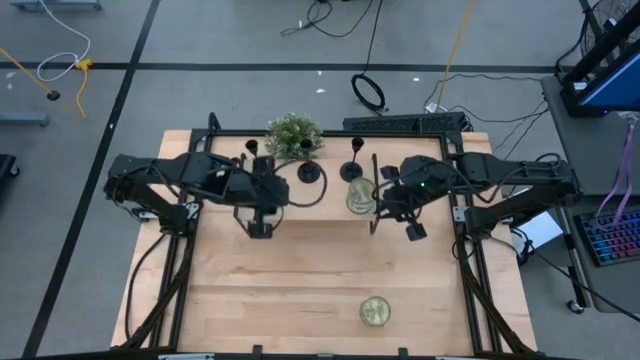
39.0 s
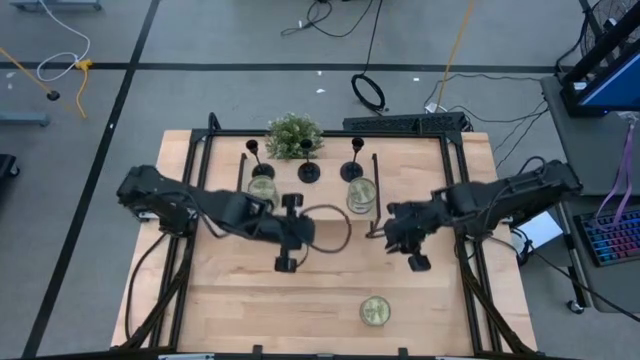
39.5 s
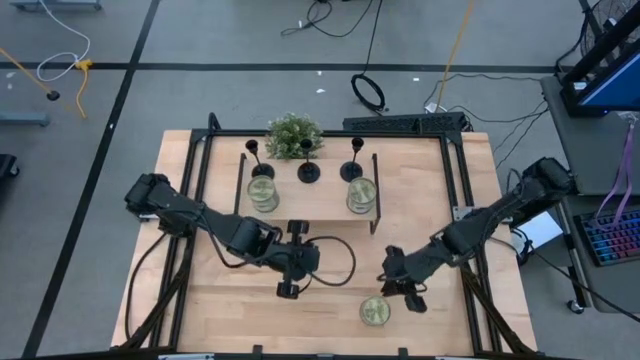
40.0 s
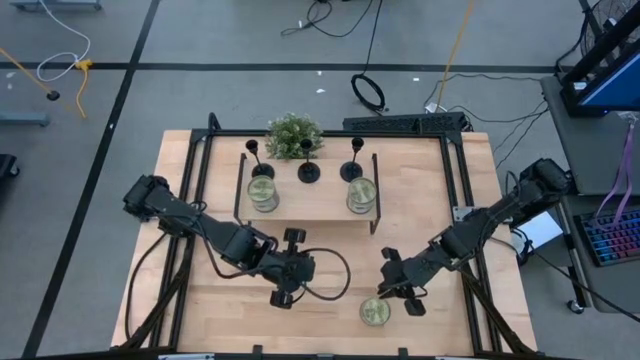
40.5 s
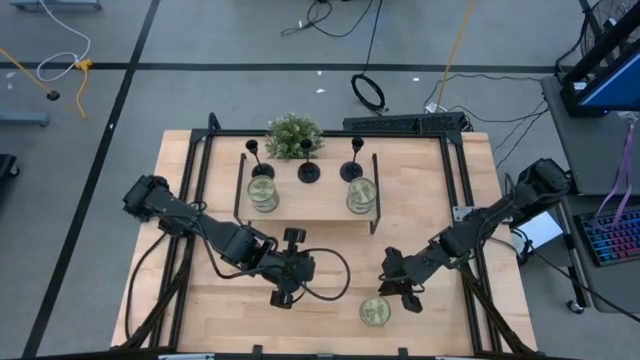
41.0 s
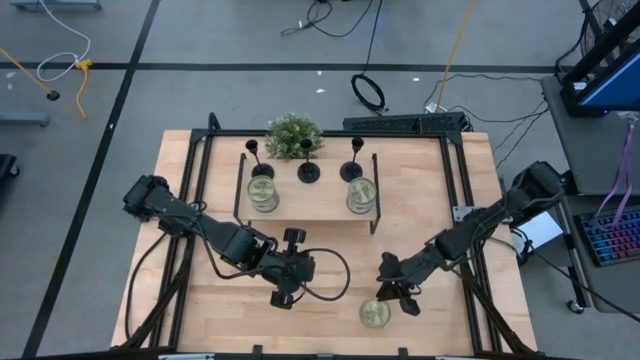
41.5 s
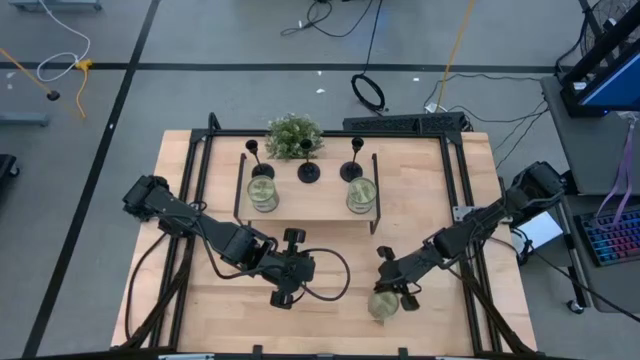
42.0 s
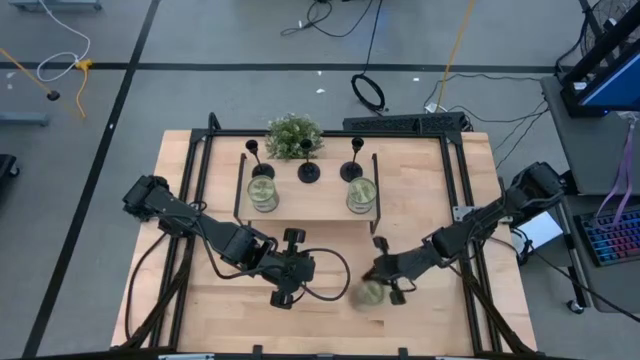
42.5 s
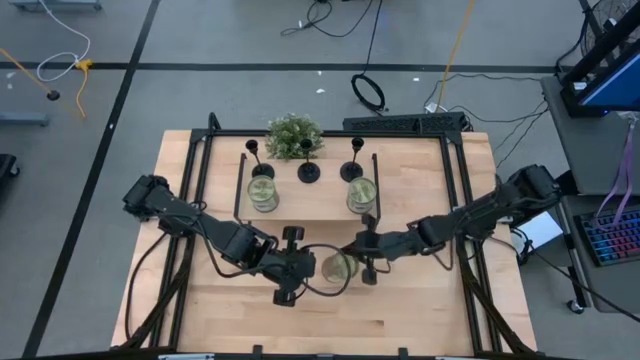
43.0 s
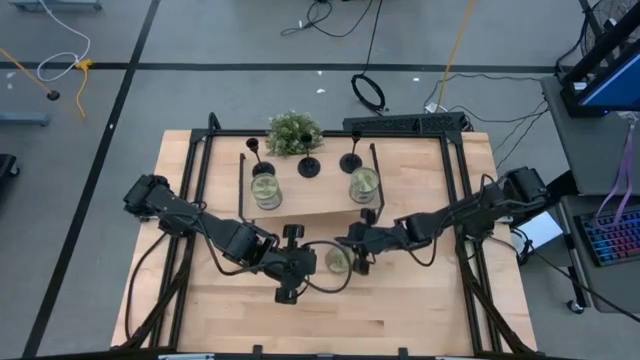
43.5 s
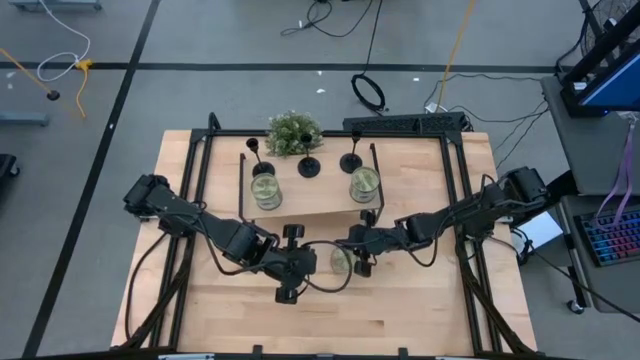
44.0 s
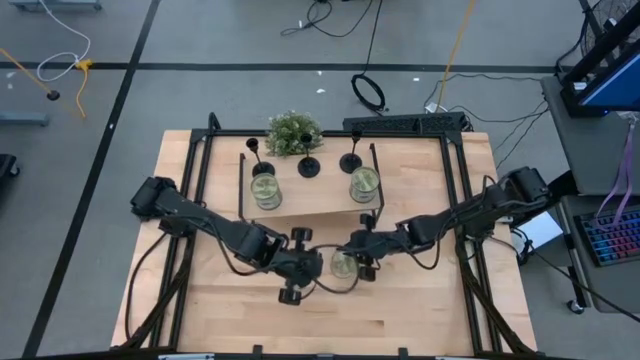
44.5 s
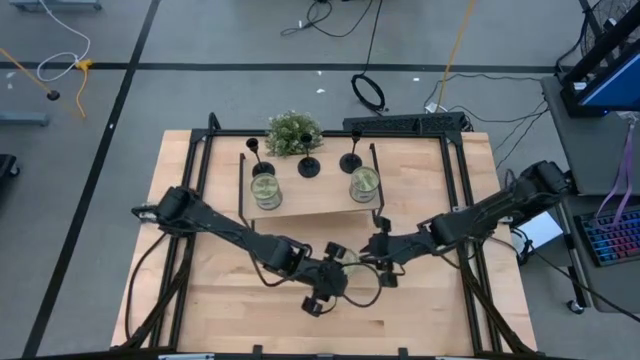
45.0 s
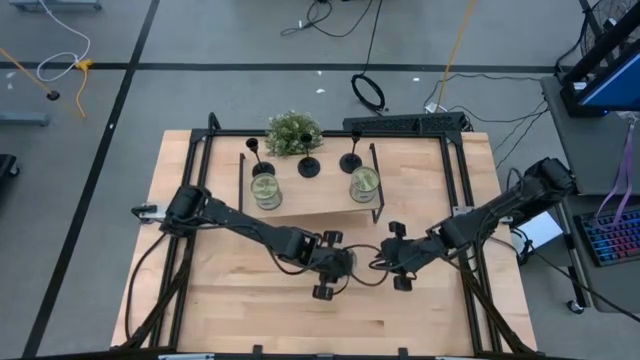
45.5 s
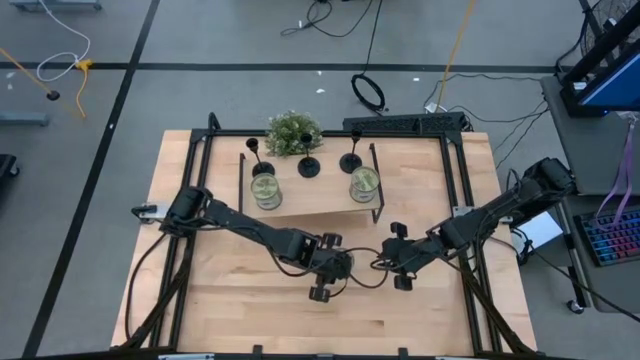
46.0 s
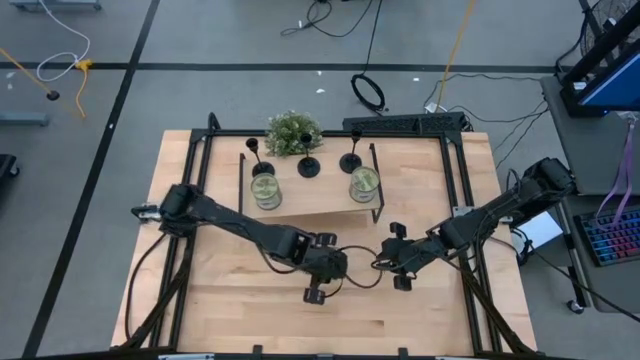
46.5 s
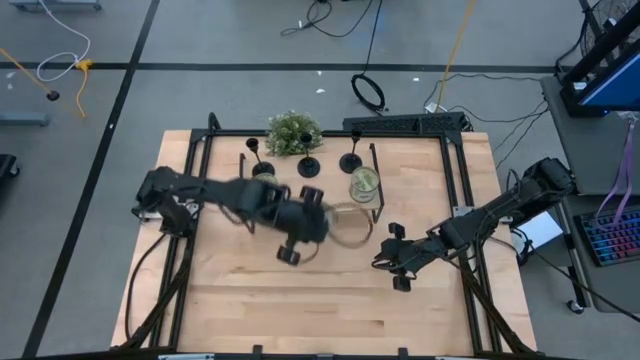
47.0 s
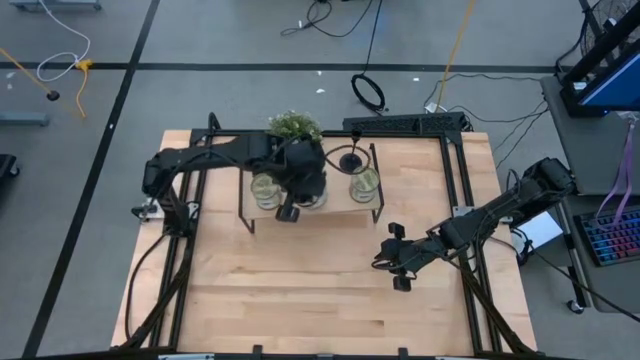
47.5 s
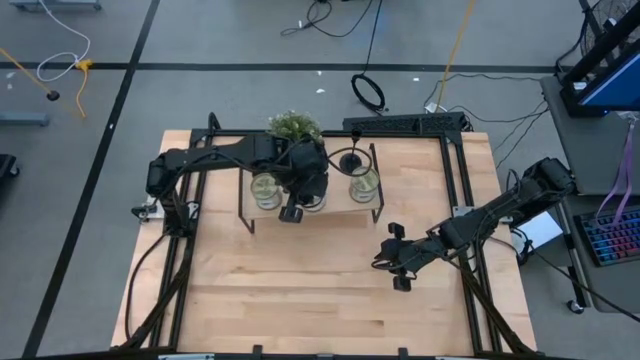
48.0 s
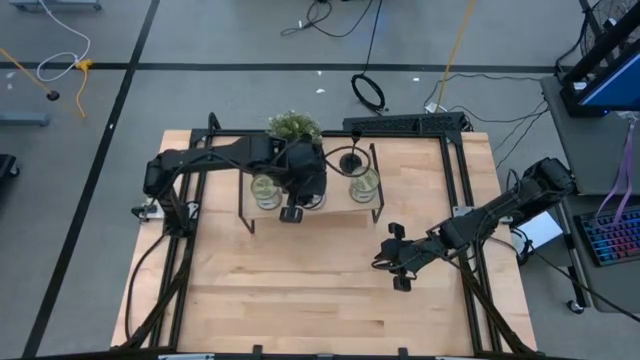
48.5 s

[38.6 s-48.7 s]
Task: Pick & Place candle stick holders
Put the silver scented candle on the shelf aligned with the silver scented candles

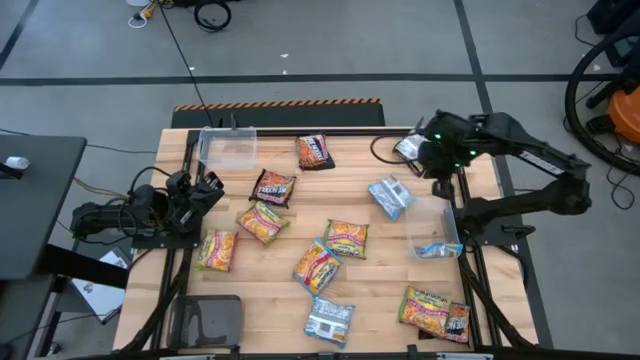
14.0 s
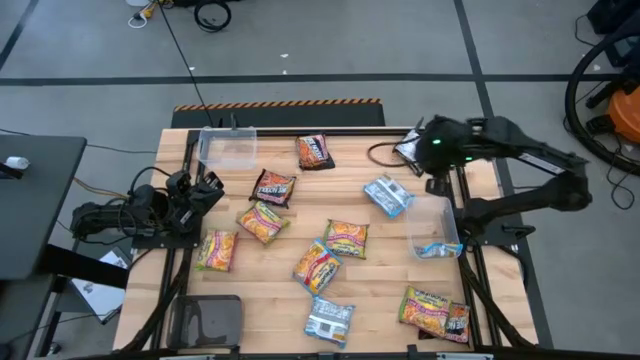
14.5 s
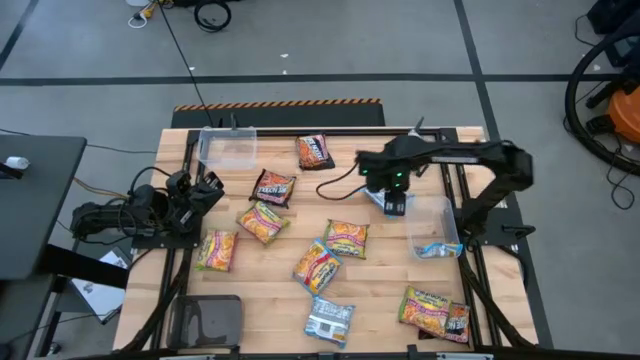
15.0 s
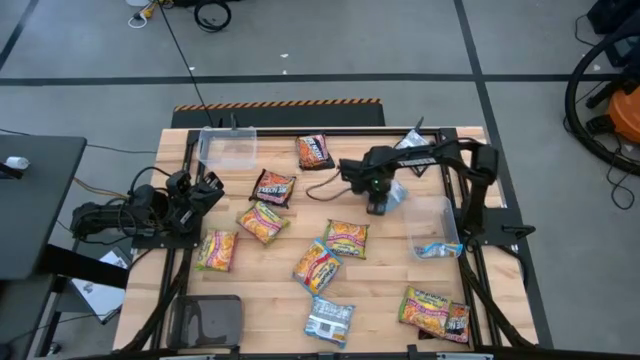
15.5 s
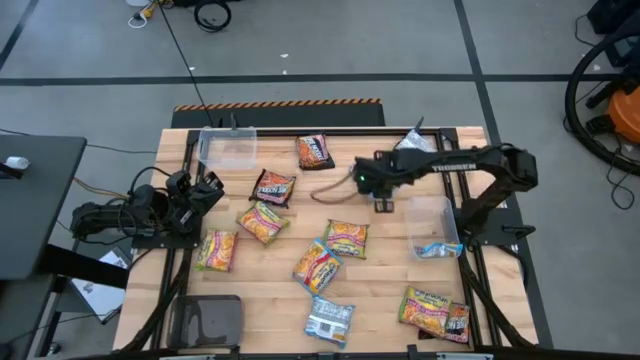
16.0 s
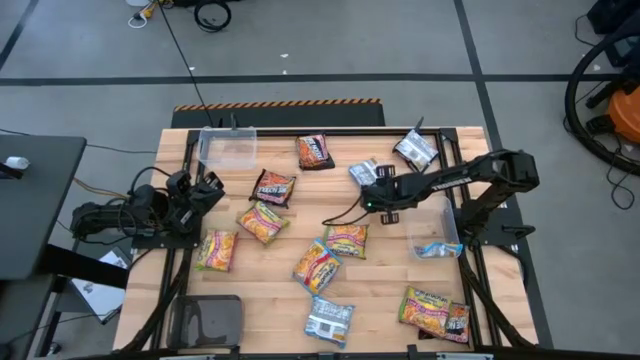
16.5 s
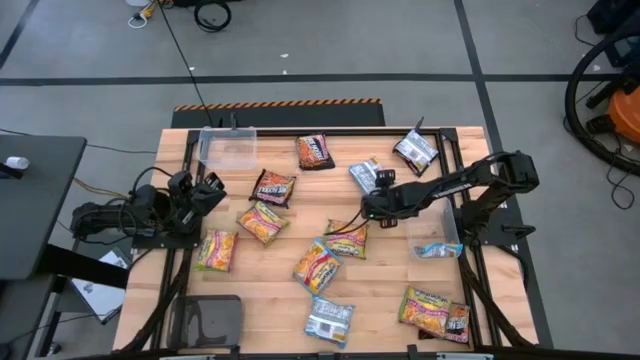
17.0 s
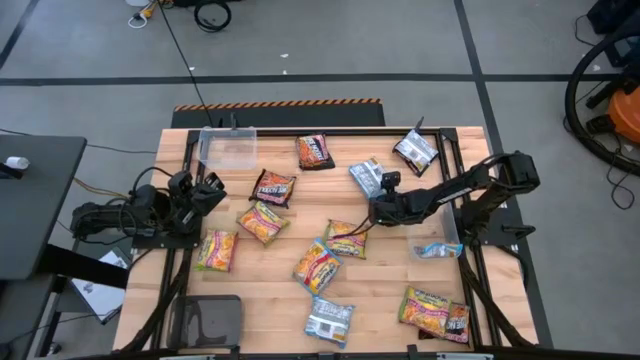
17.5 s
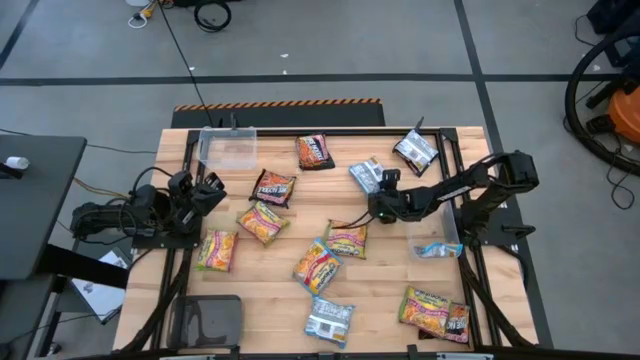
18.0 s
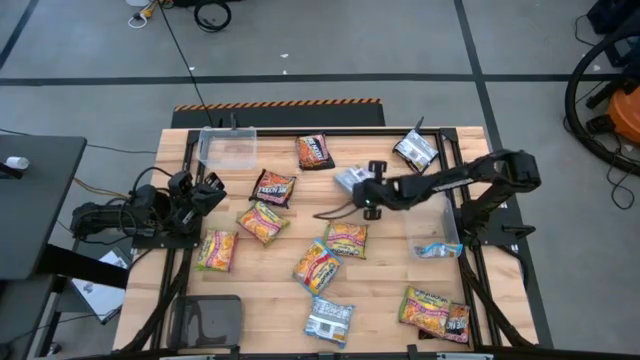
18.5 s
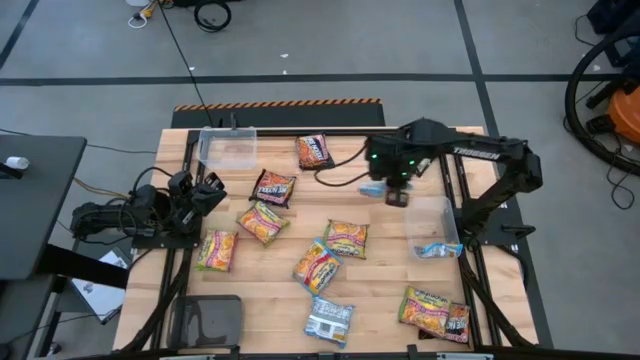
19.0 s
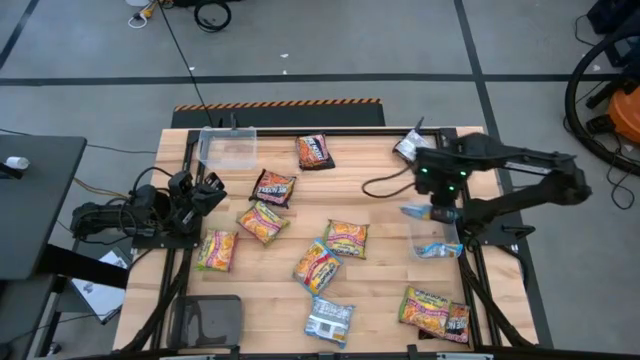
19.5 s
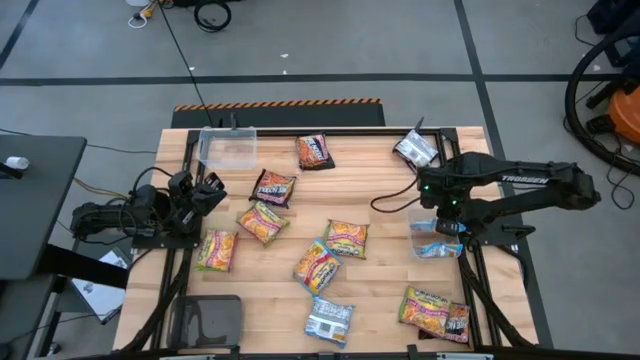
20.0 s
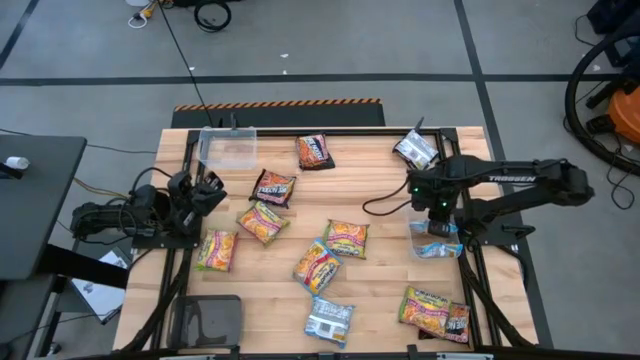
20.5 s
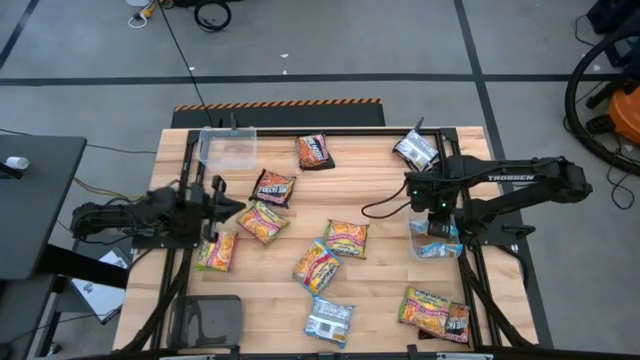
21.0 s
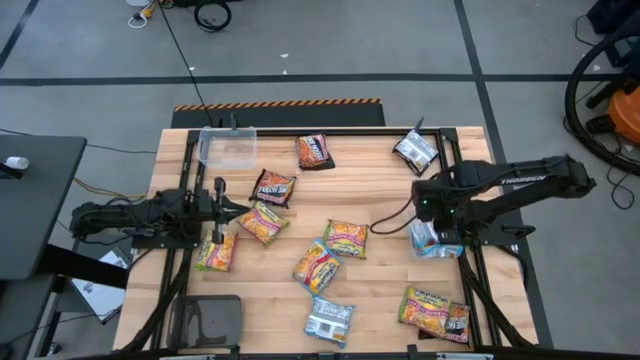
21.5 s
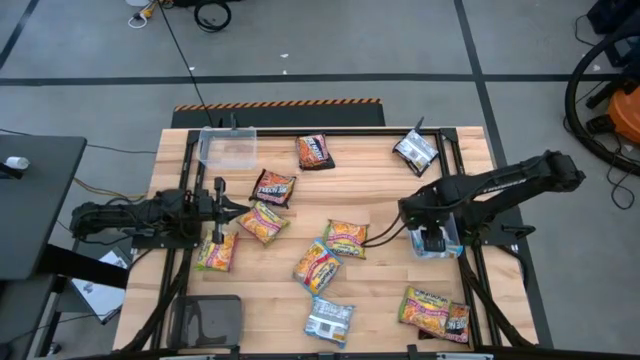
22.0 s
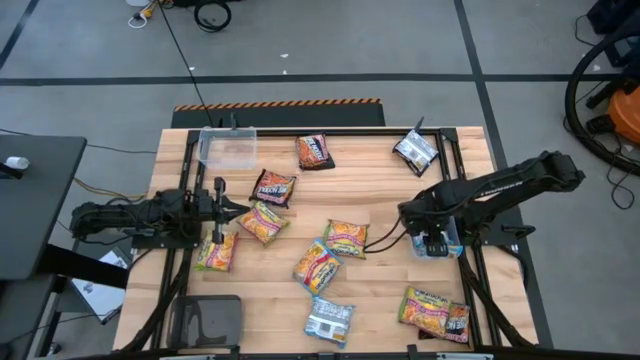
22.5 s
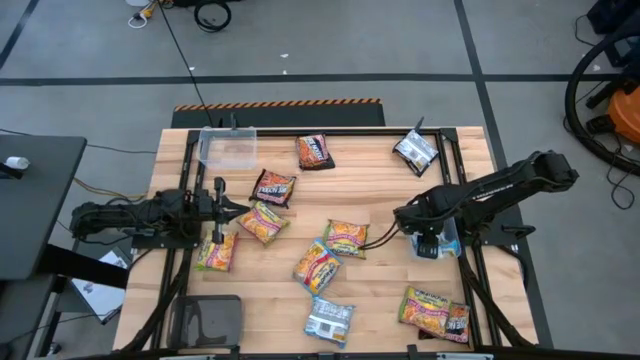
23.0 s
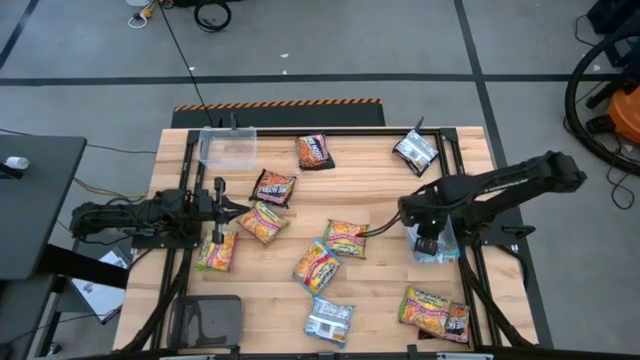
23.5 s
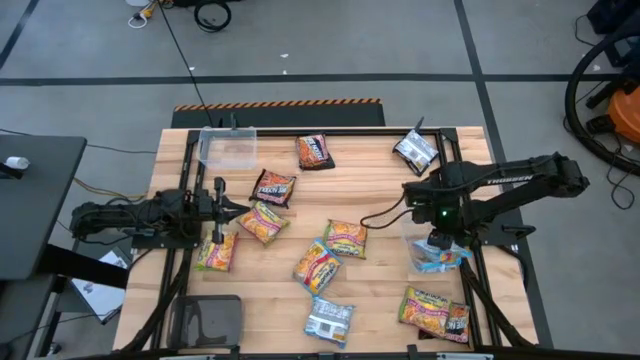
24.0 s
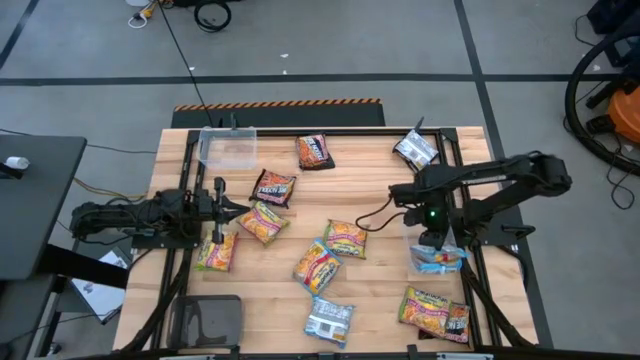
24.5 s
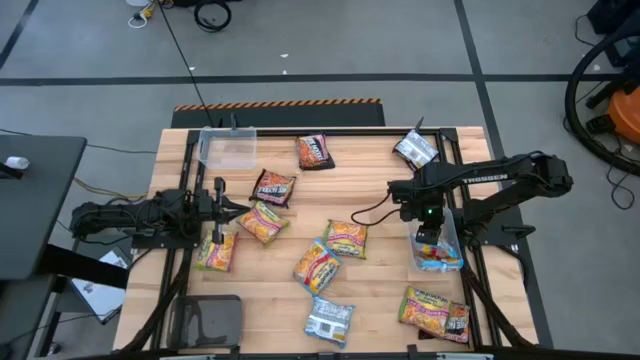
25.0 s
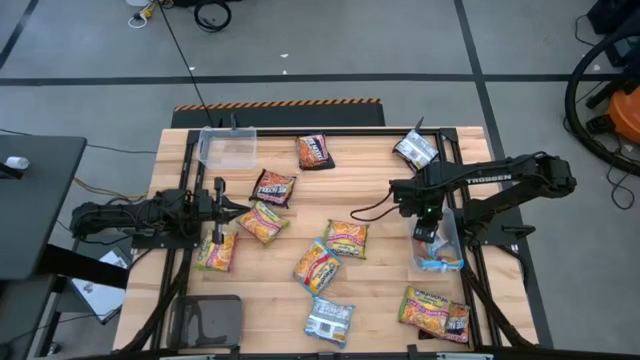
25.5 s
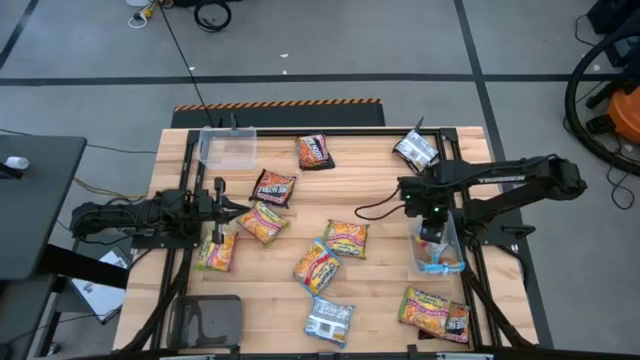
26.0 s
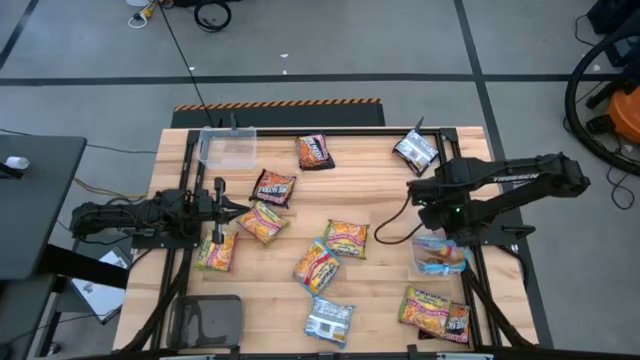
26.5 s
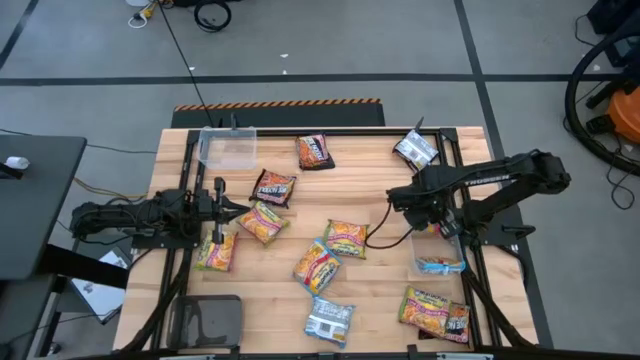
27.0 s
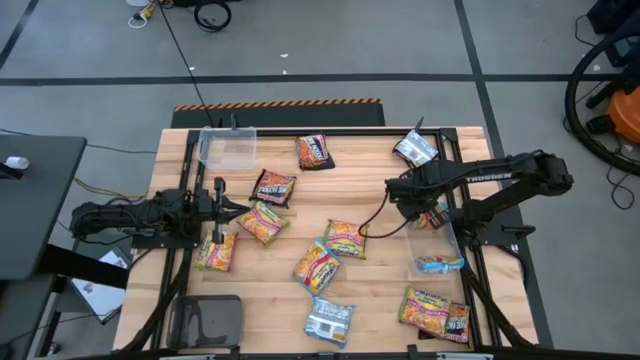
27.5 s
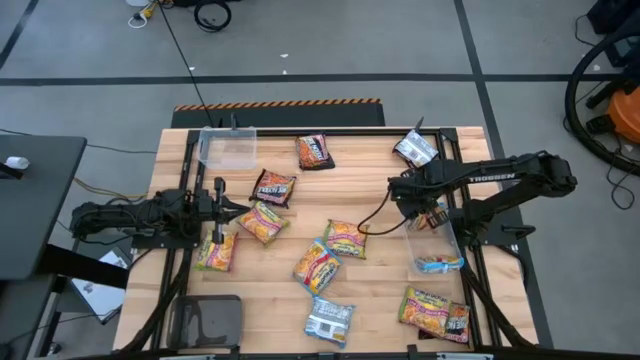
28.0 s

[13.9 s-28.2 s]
Task: Sort Maruchan noodles
Put the blue noodle pack into the bottom transparent bin
